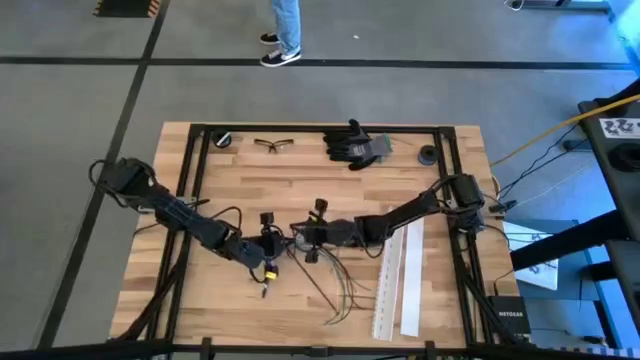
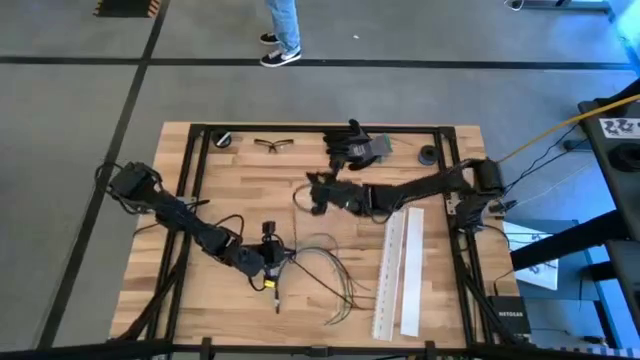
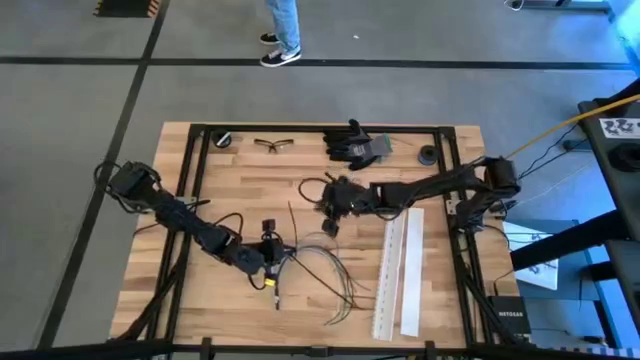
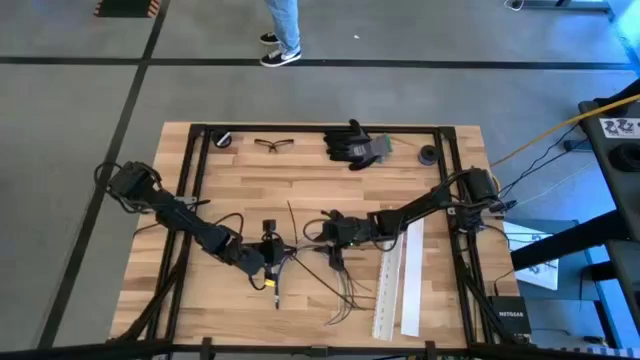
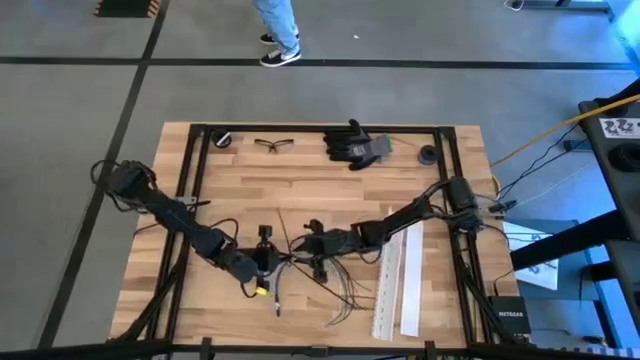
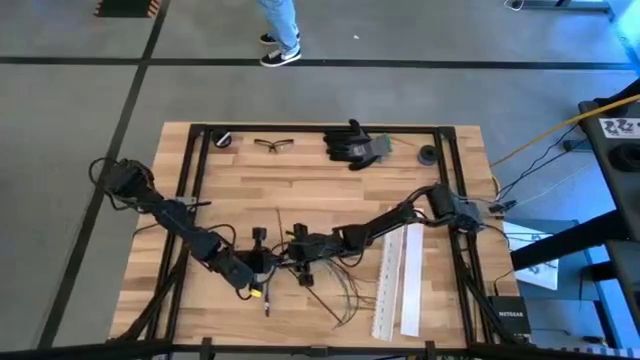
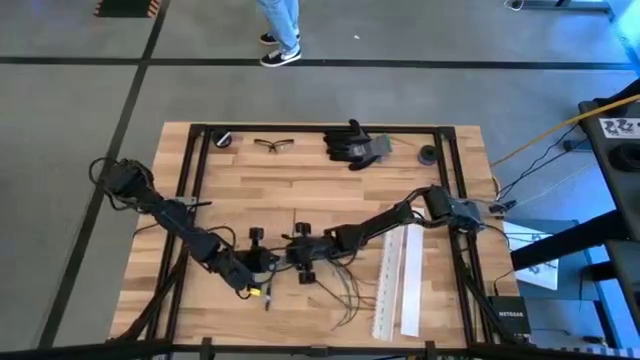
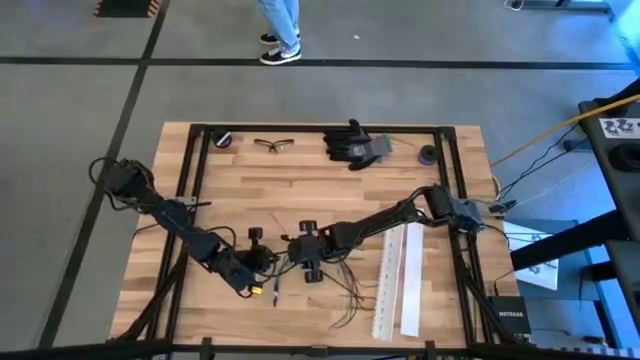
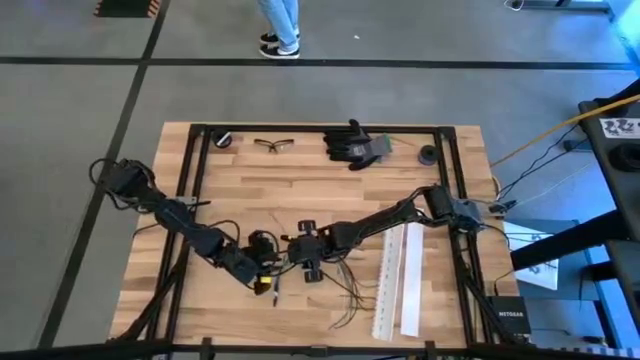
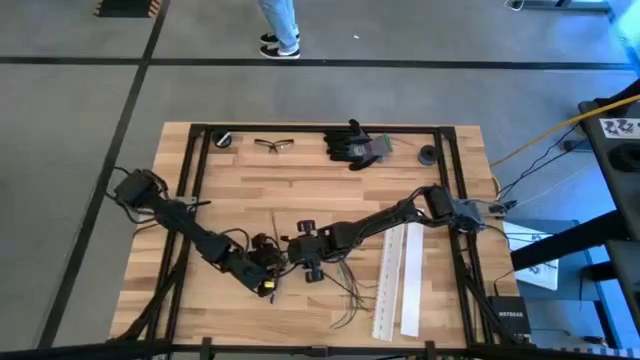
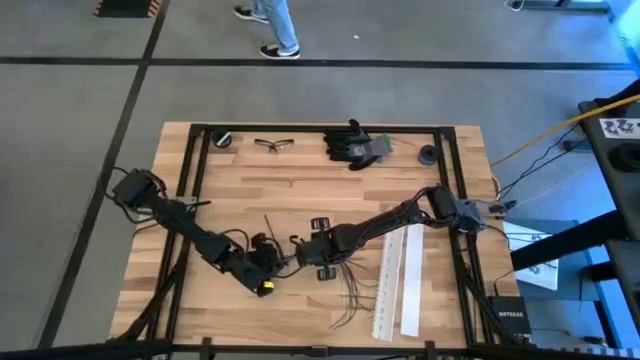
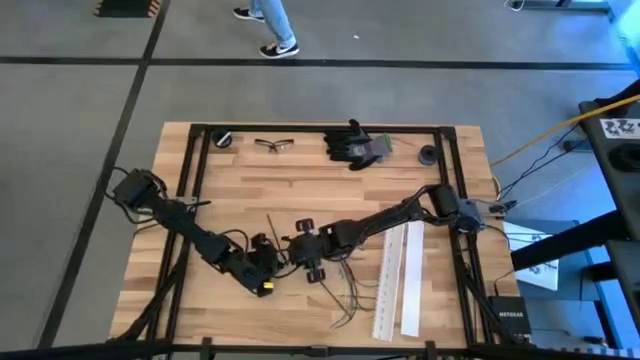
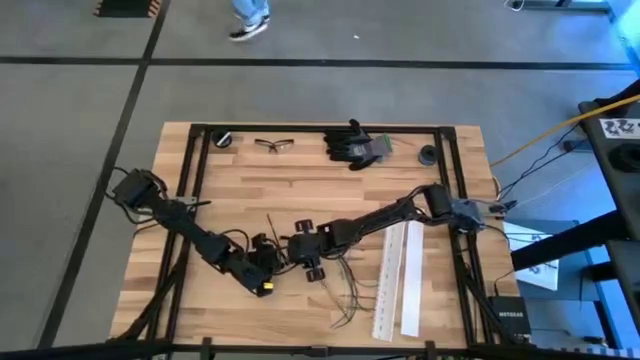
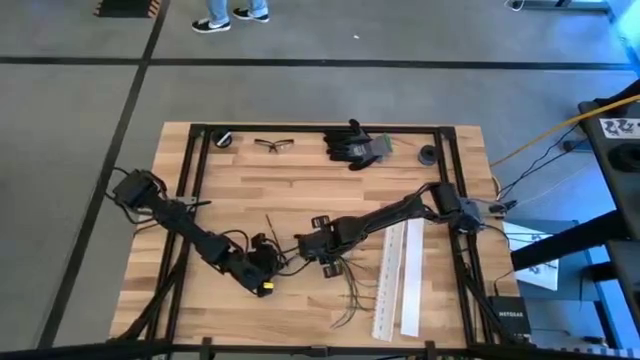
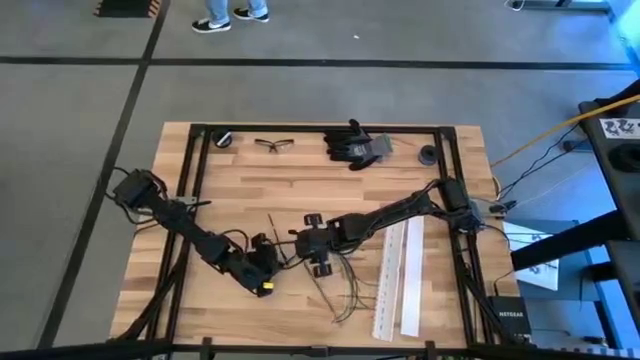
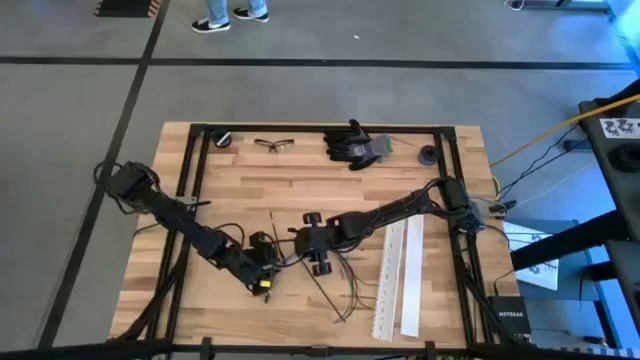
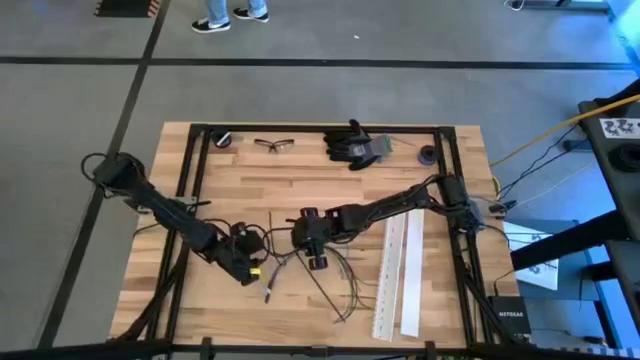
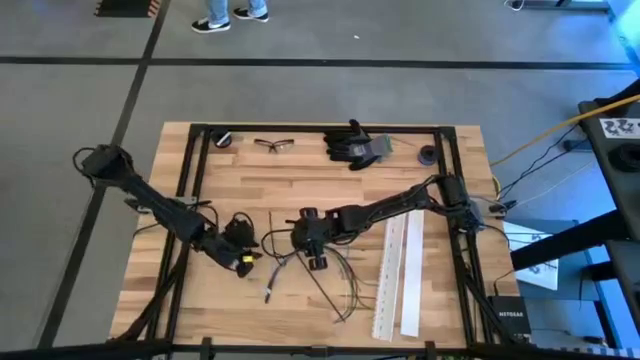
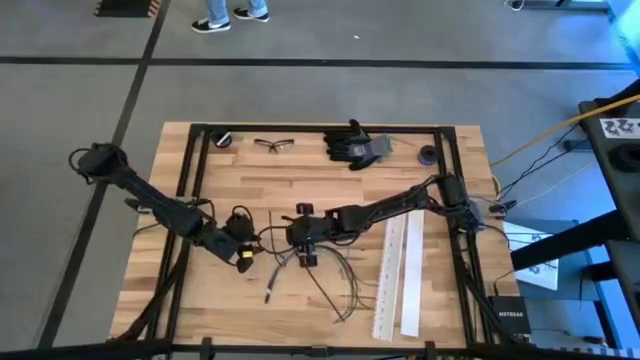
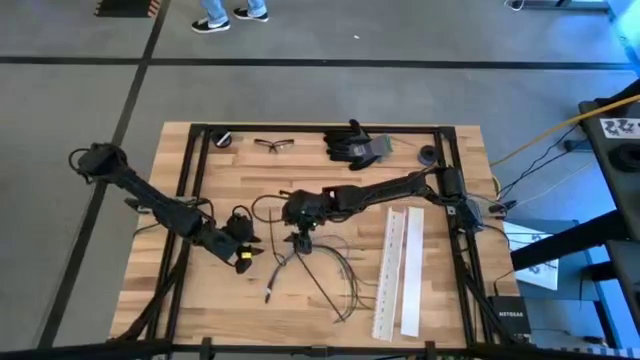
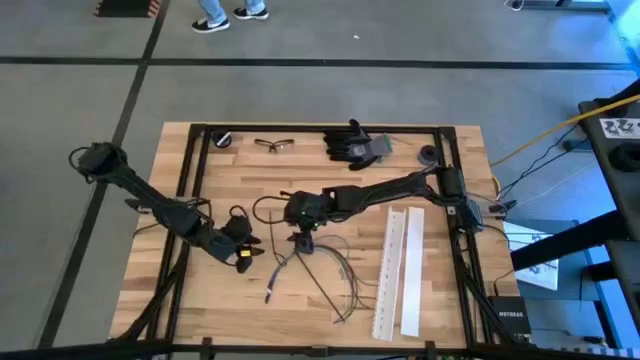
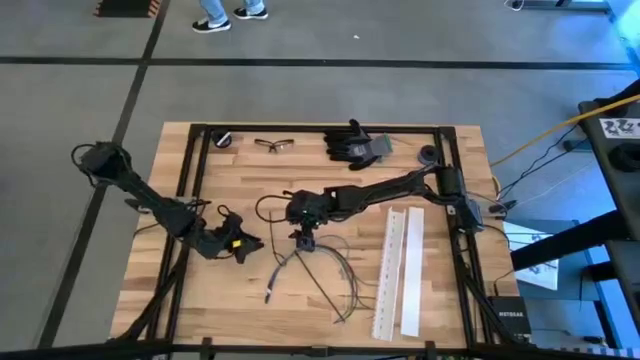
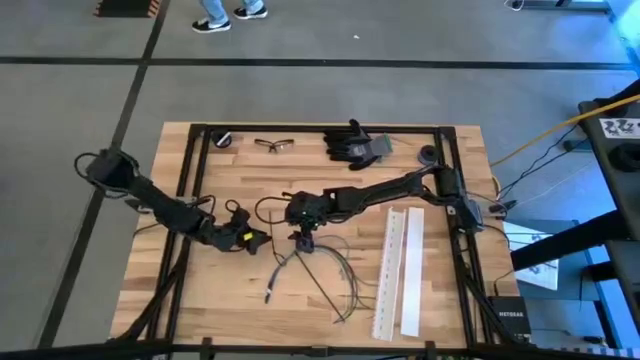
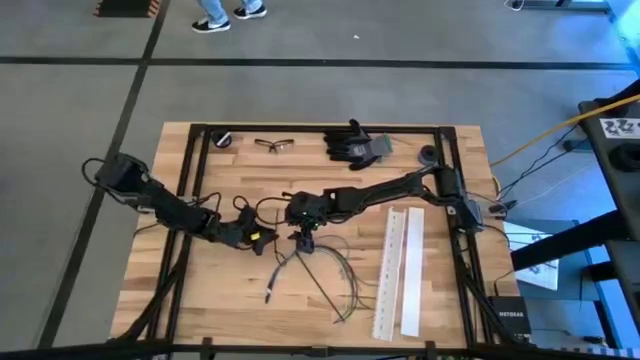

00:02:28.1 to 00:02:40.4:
Task: Ziptie cables
Wrap the zip tie on the cables

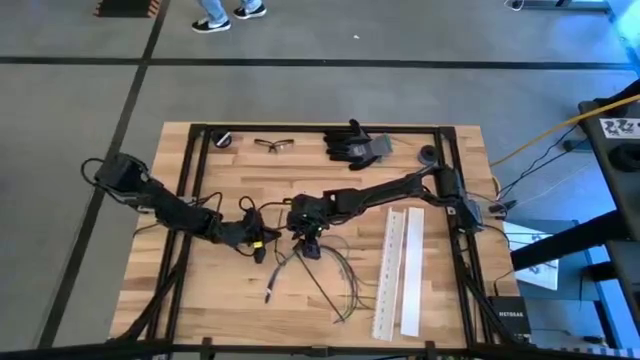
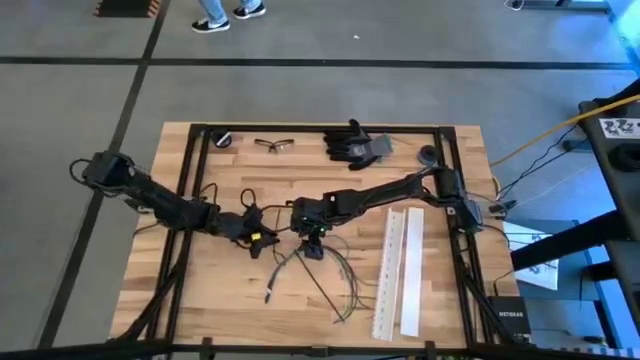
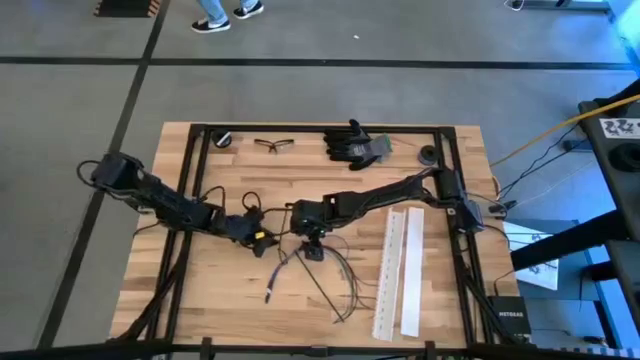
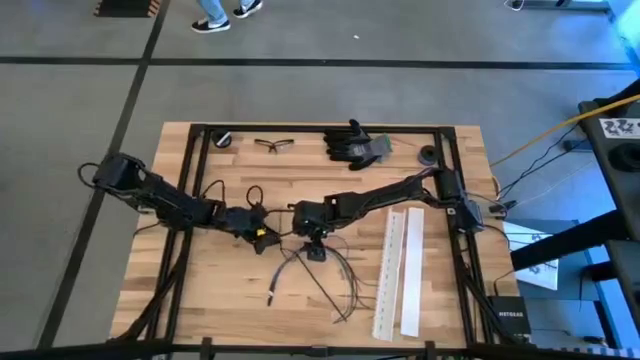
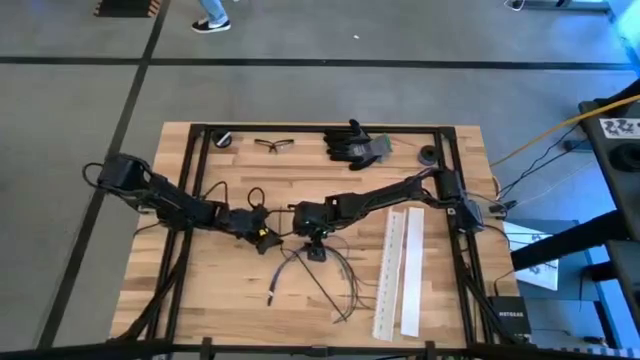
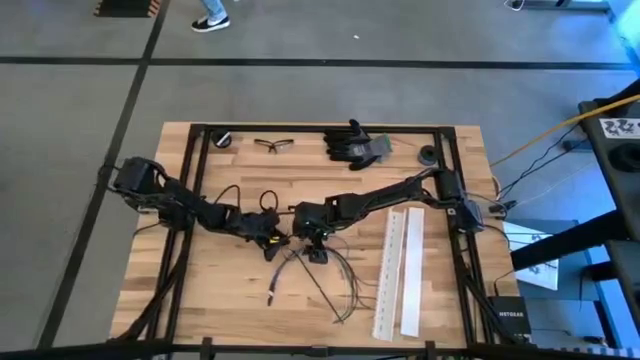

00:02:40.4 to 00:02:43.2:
Wrap the zip tie on the cables

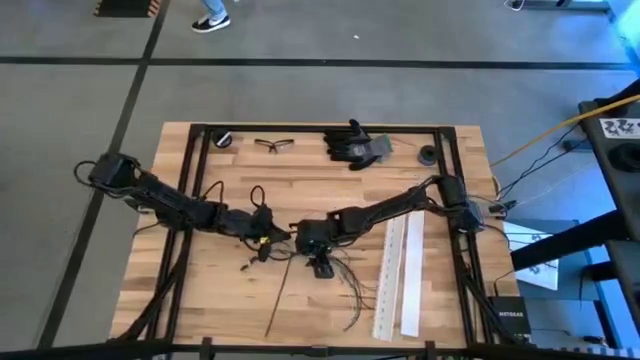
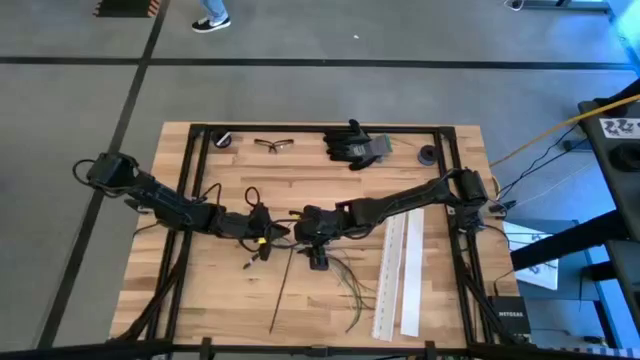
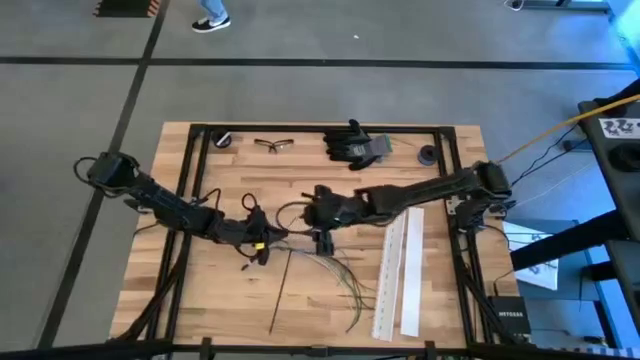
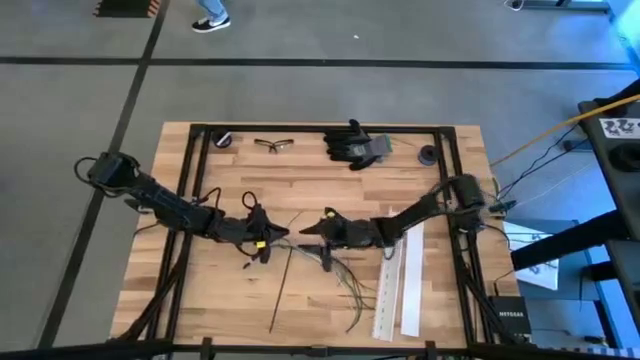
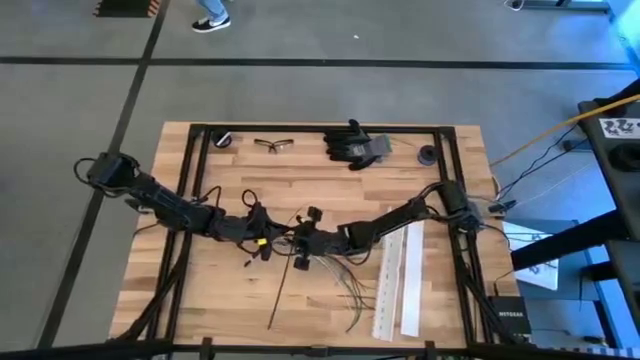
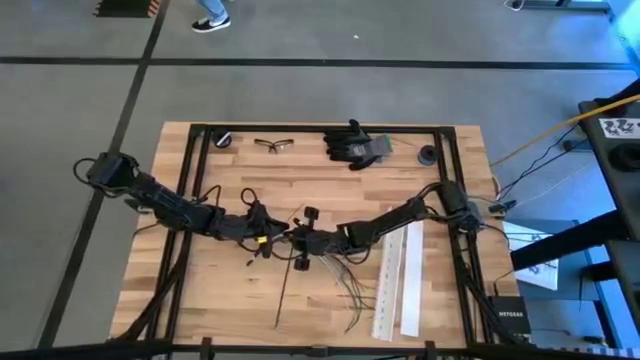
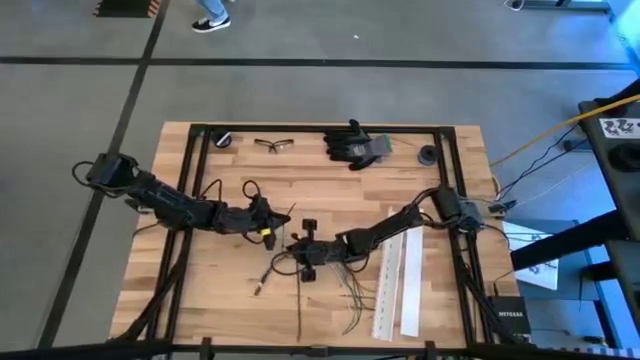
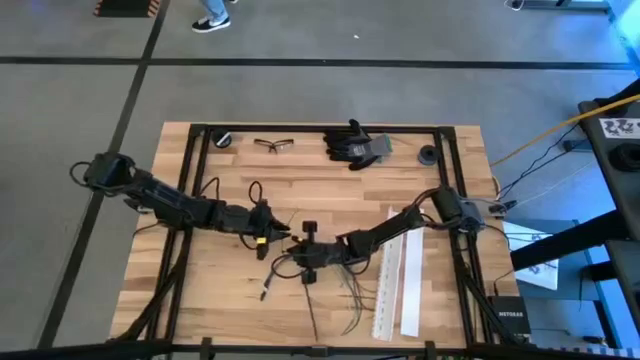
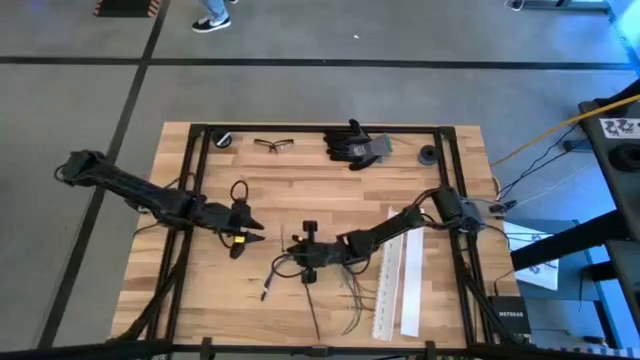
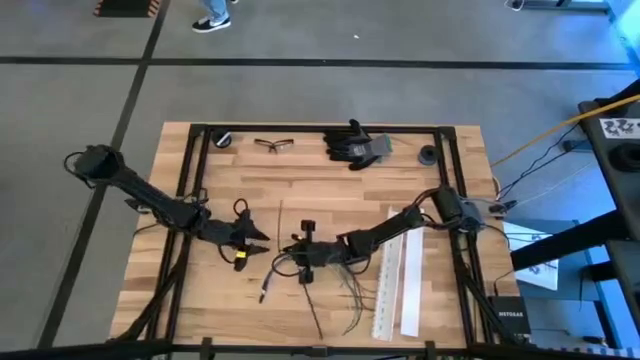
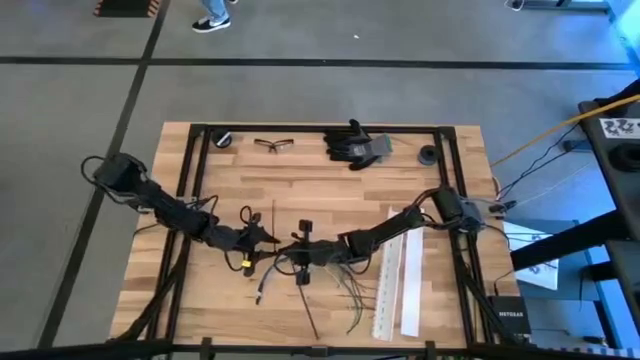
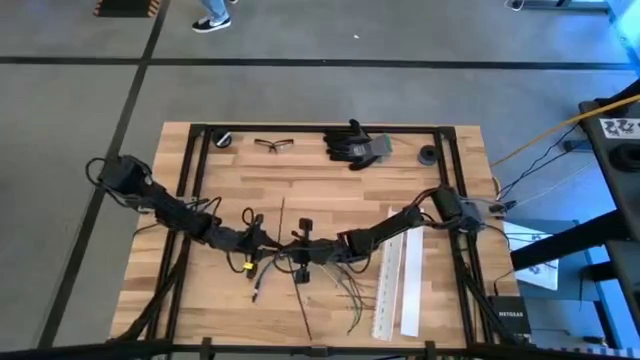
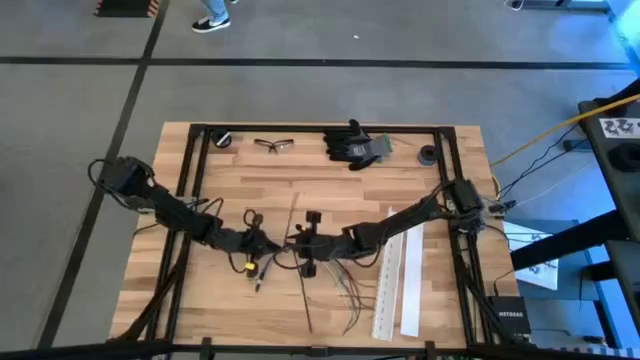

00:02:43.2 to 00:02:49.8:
Wrap the zip tie on the cables

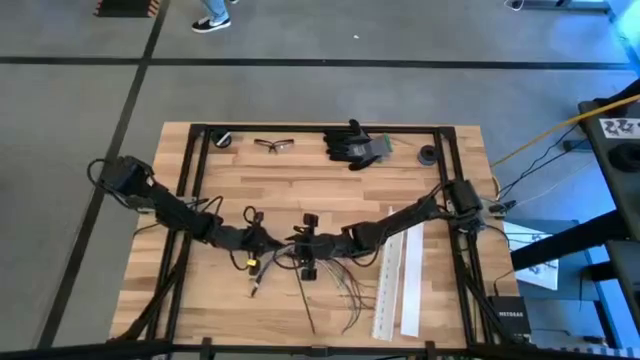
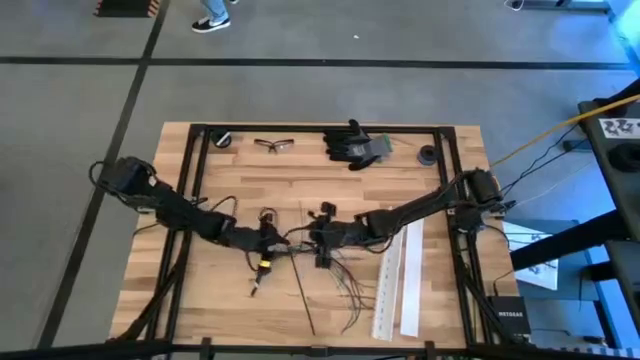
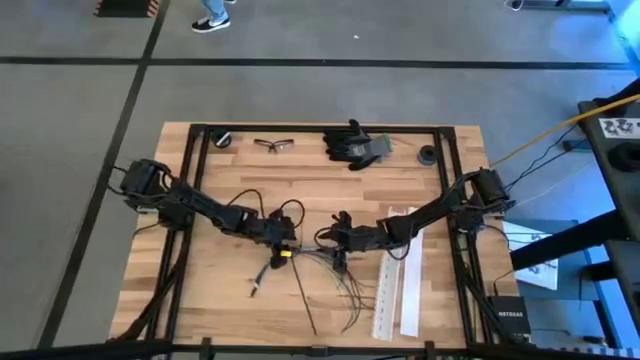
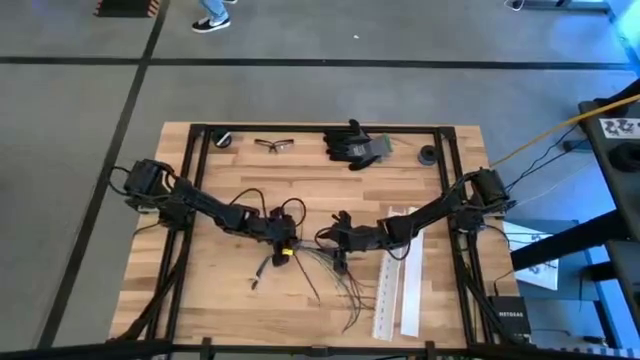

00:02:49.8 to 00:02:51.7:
Wrap the zip tie on the cables
